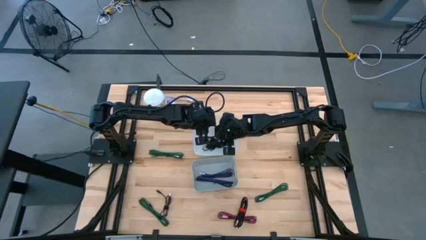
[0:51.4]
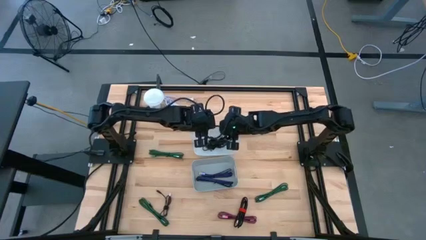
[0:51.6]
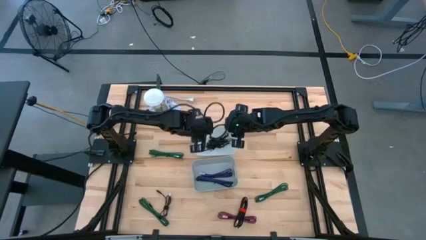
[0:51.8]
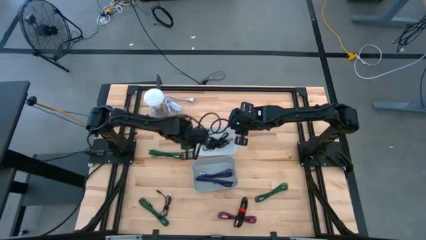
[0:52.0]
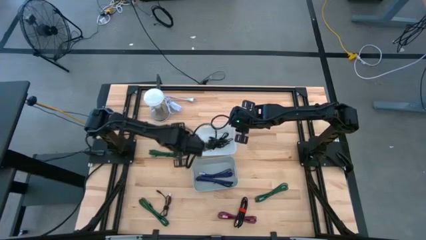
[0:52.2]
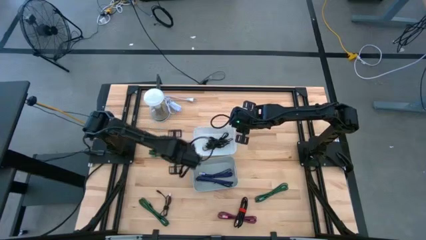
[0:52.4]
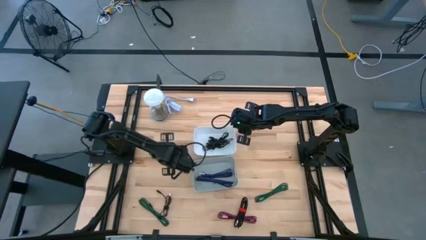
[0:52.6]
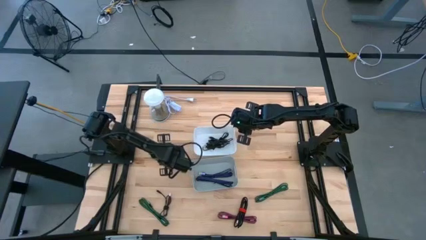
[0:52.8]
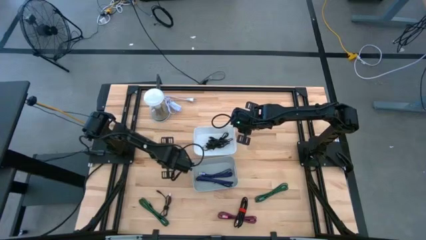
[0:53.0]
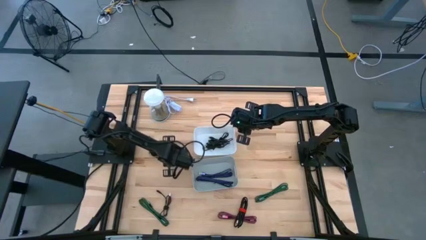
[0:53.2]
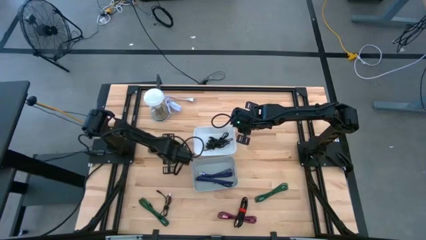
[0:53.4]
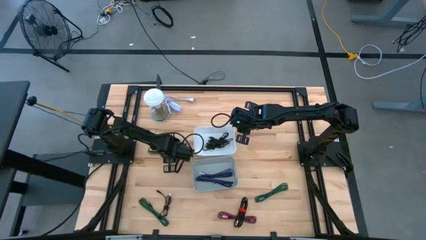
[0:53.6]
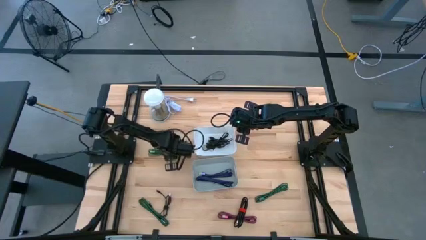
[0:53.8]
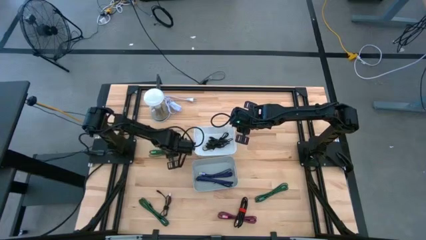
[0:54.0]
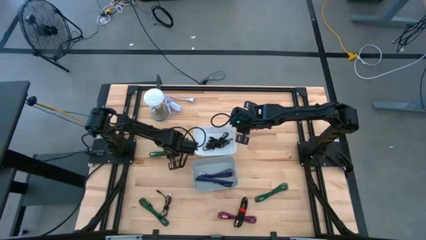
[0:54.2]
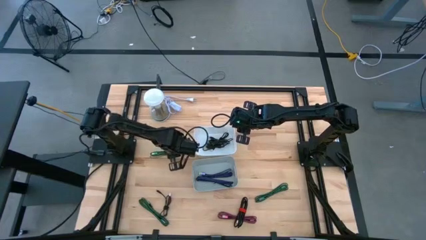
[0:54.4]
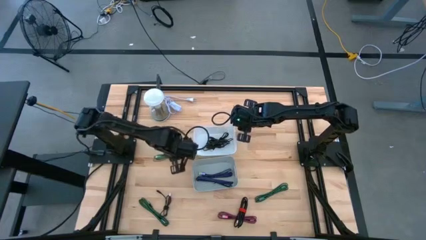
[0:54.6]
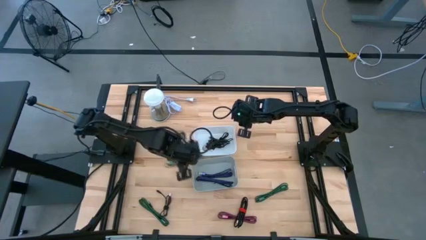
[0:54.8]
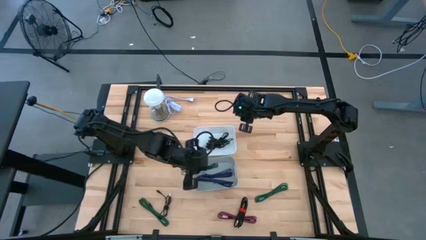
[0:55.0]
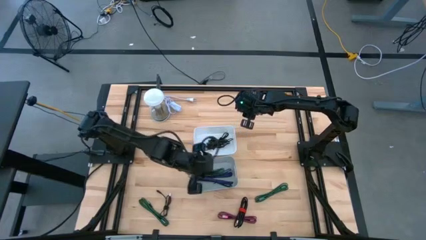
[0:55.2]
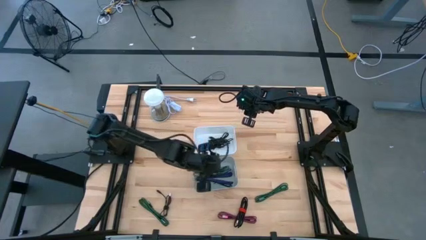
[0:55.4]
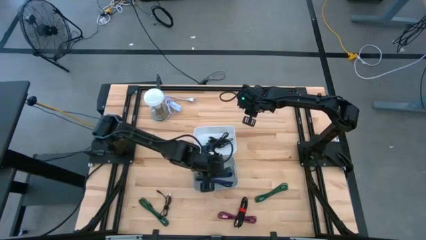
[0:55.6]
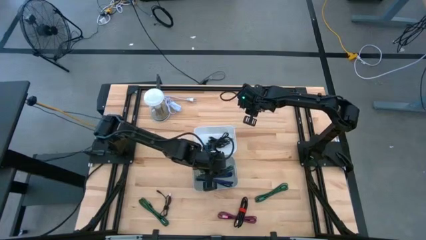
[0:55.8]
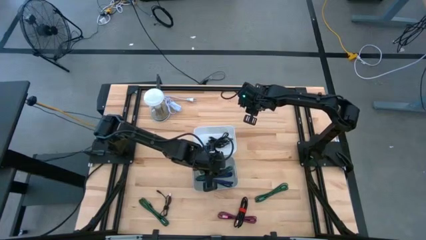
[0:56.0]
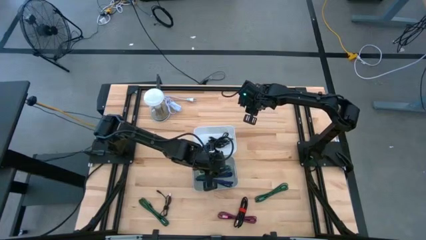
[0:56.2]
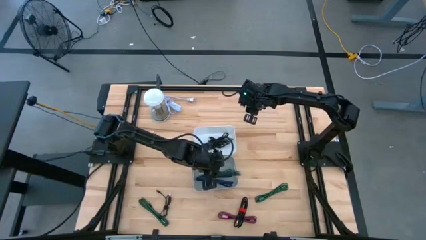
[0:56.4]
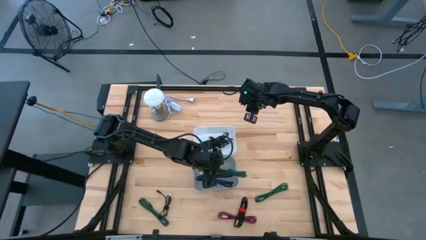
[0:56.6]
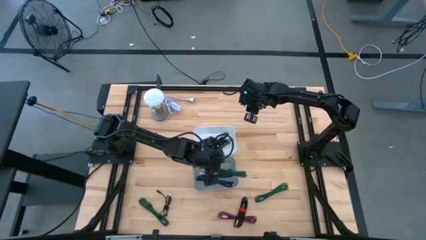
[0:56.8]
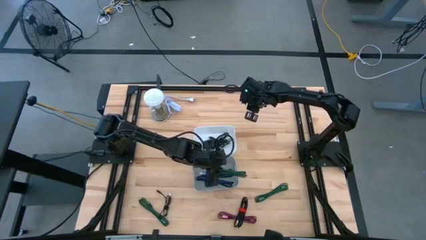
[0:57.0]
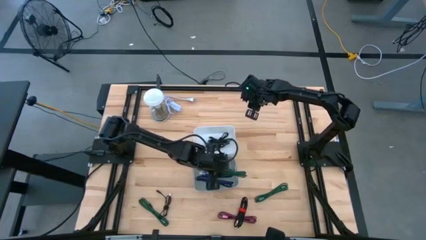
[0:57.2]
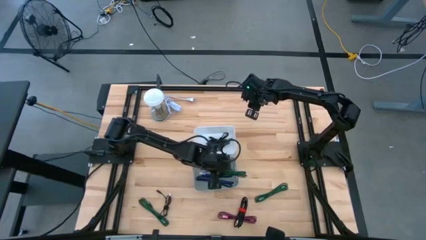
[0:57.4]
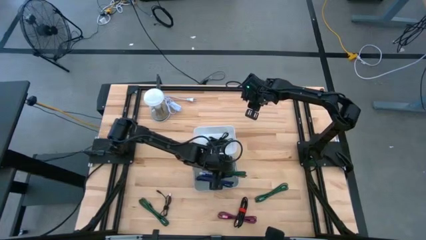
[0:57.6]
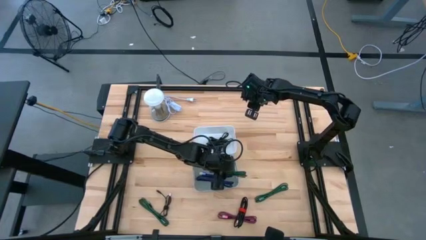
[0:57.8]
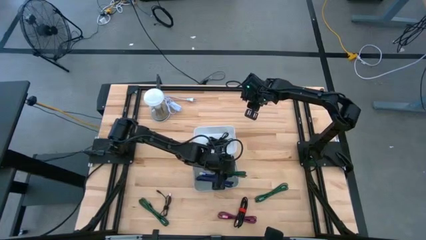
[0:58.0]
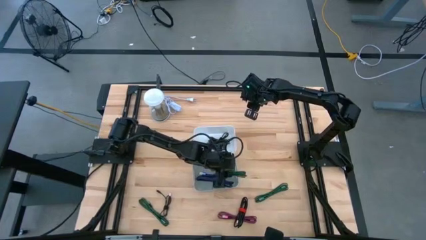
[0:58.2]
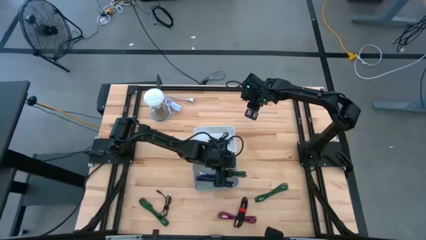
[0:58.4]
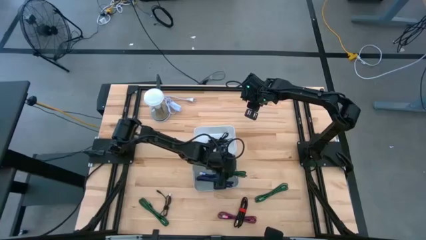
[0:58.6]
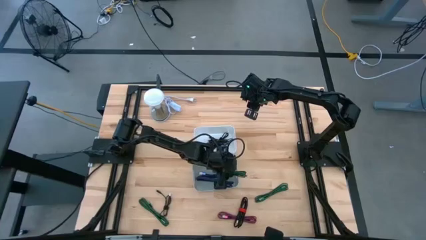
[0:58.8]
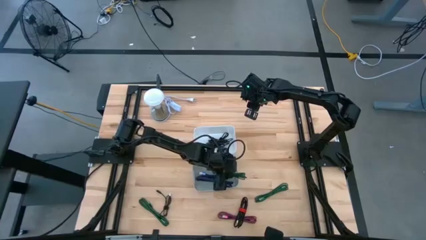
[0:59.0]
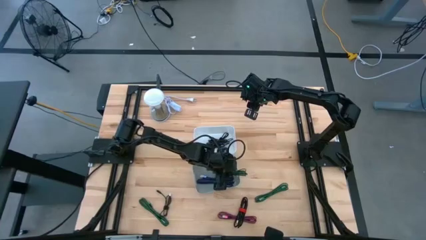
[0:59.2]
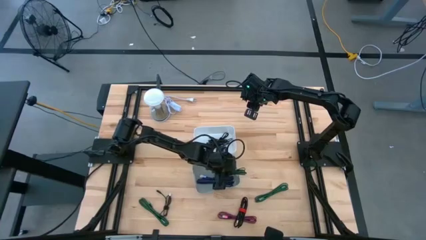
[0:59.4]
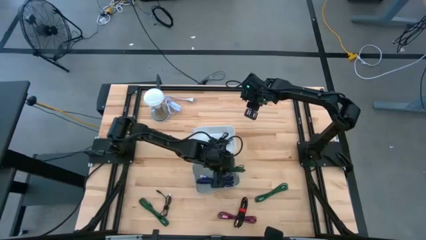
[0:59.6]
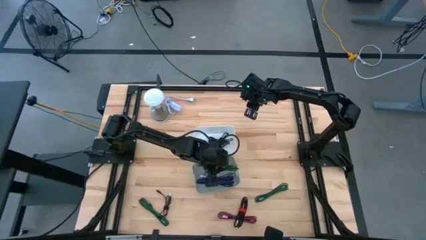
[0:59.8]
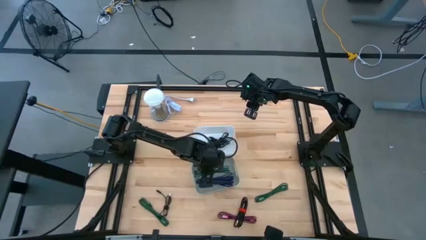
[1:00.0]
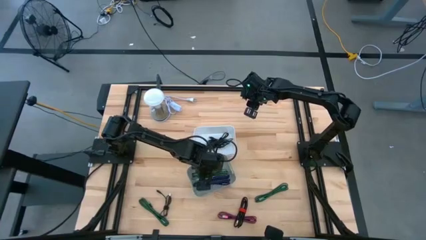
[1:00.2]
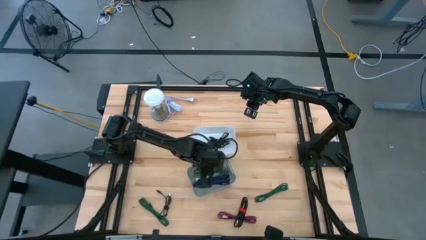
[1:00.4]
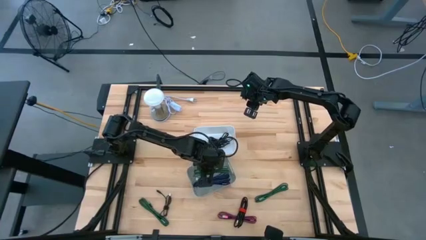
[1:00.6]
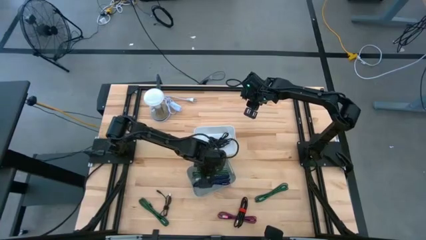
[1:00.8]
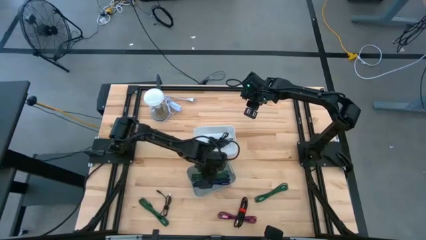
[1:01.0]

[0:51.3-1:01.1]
Task: Pick & Place USB Port
Put the green charger cable into the gray container

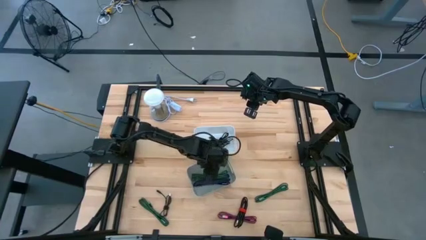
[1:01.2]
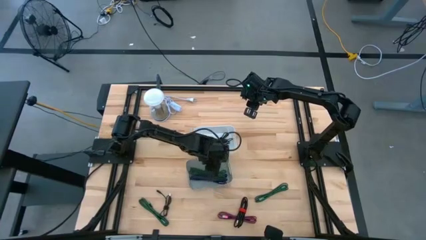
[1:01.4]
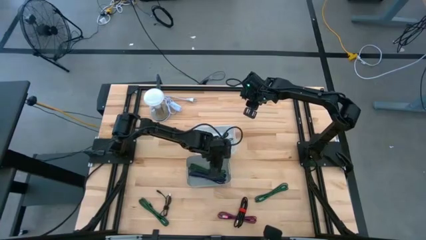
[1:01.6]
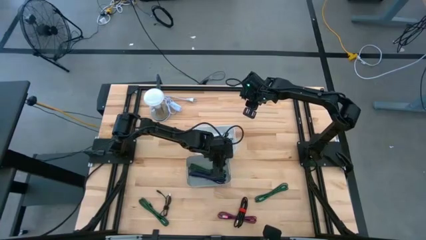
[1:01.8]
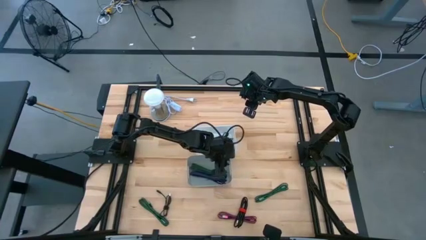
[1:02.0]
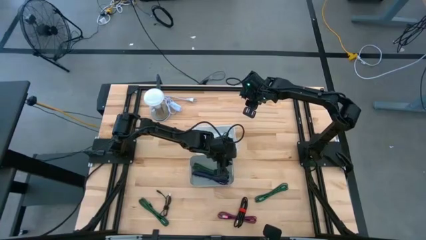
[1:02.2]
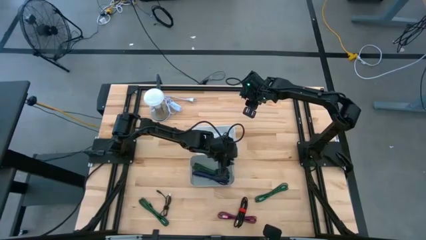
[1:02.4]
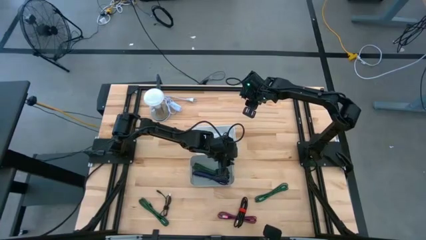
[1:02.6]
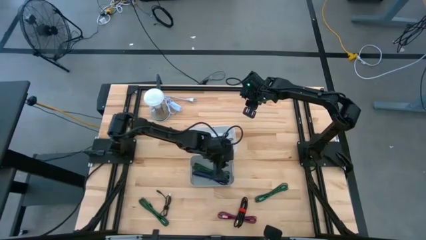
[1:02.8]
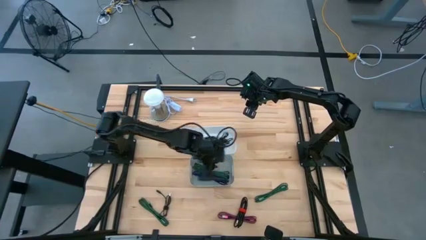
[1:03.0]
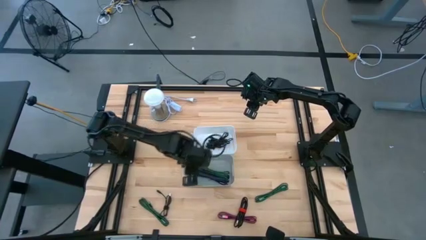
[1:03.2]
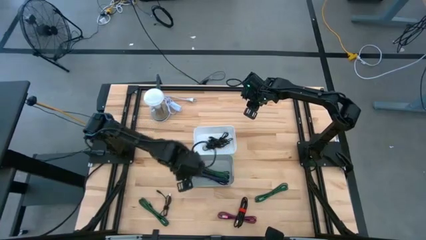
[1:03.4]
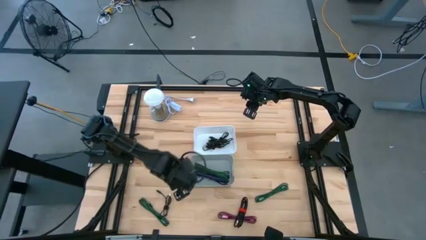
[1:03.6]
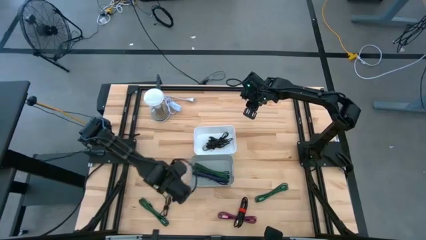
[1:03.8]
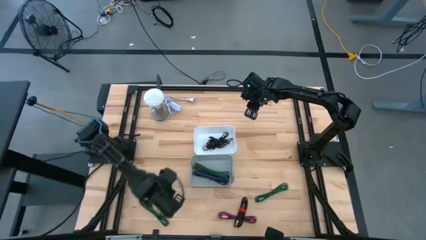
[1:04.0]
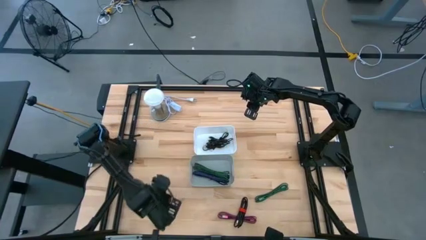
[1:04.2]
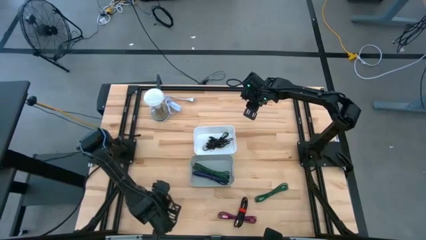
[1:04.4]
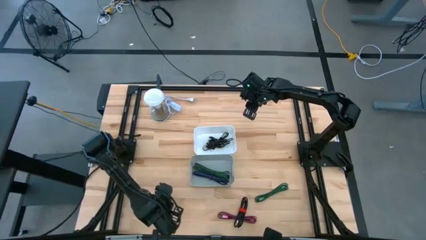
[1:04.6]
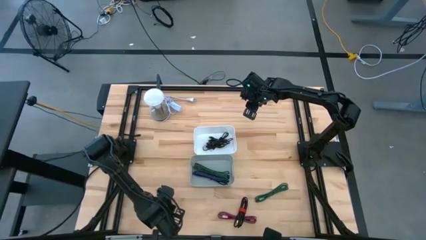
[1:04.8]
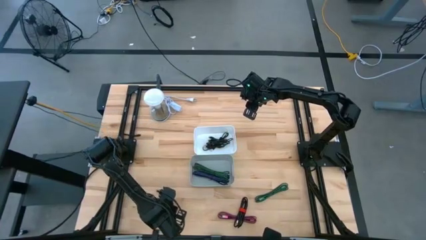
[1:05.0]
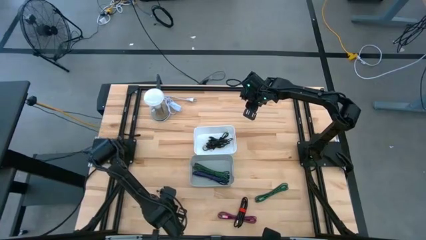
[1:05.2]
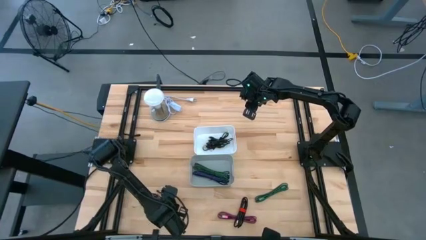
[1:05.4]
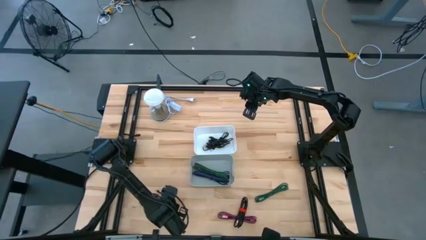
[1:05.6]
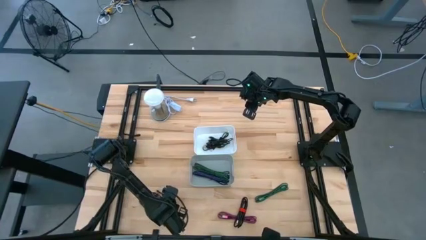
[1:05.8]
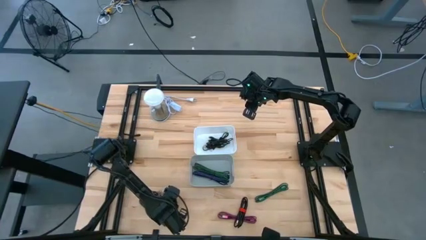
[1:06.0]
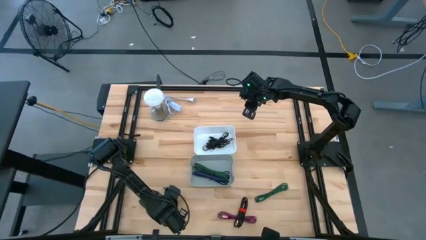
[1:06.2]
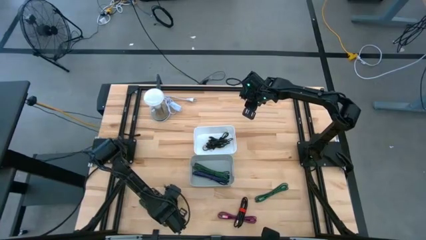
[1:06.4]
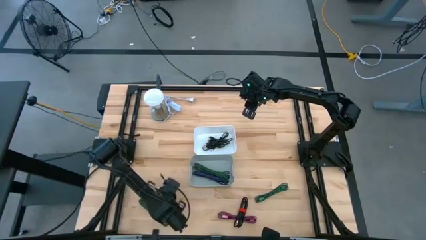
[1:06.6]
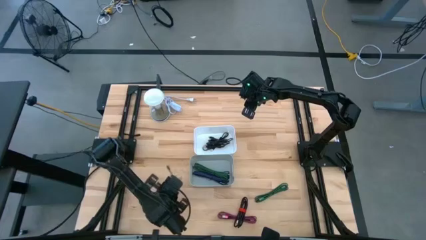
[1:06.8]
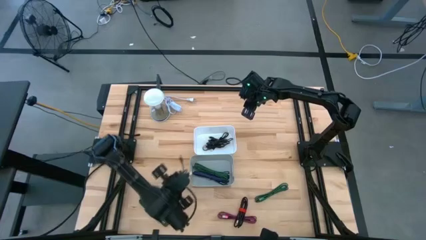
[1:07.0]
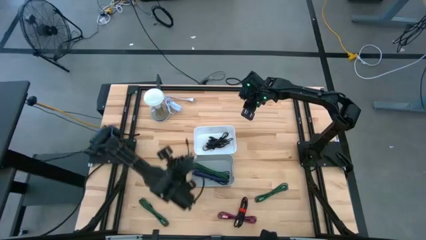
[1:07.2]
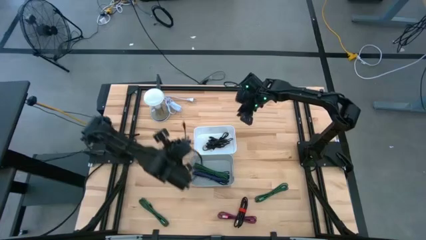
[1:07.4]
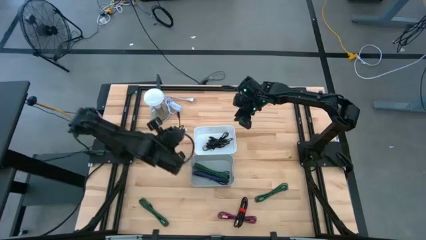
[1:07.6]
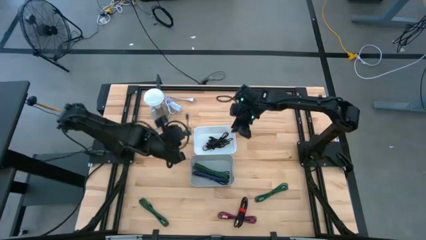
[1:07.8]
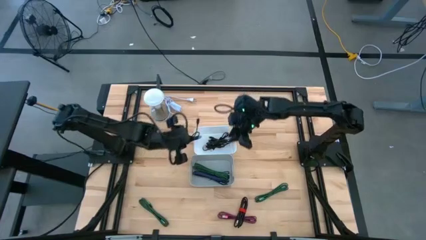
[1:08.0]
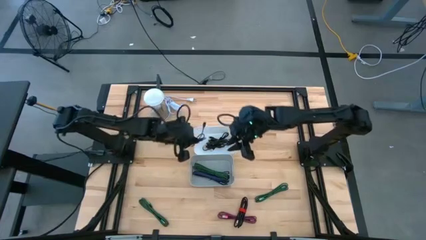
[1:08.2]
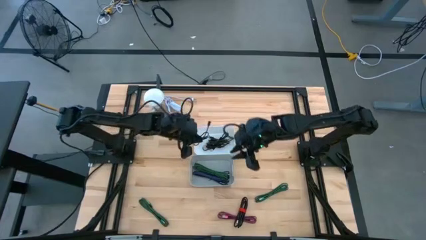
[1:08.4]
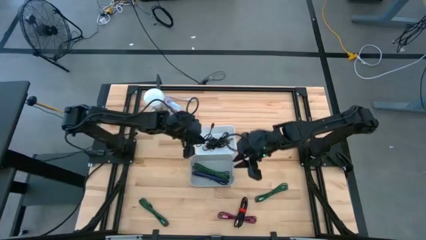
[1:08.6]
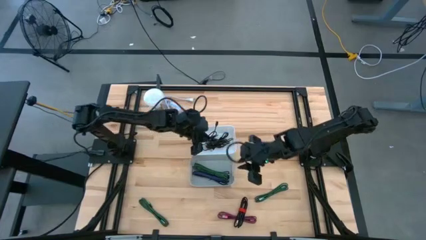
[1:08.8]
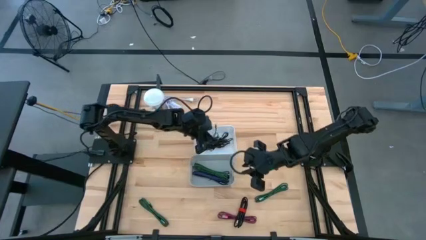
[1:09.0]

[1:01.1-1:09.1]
Put the black charger cable into the white container
